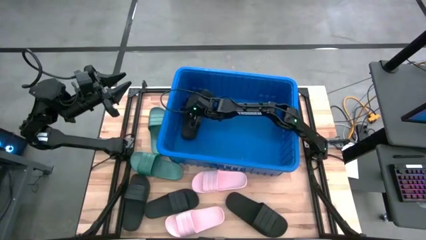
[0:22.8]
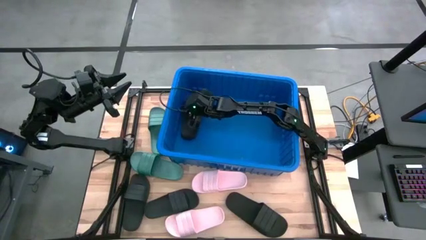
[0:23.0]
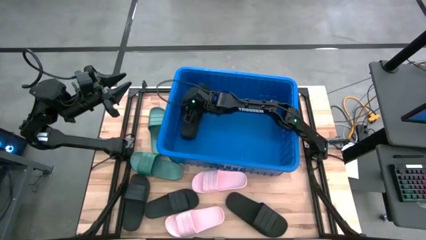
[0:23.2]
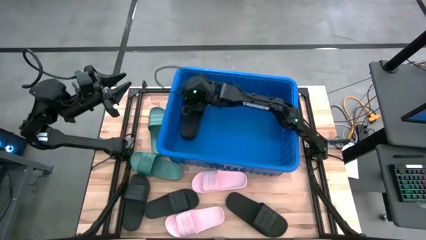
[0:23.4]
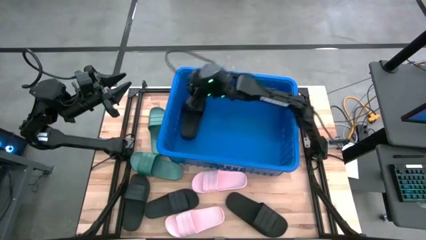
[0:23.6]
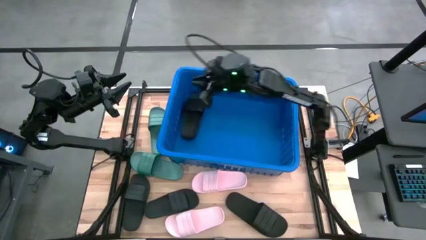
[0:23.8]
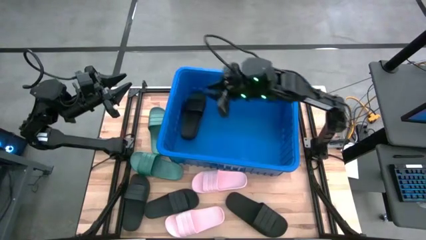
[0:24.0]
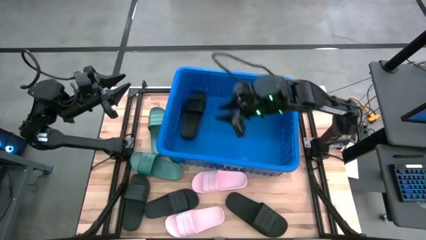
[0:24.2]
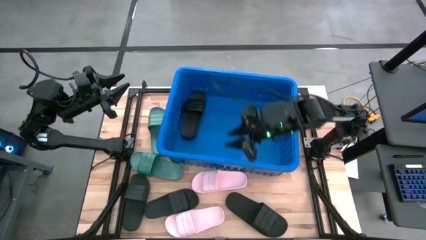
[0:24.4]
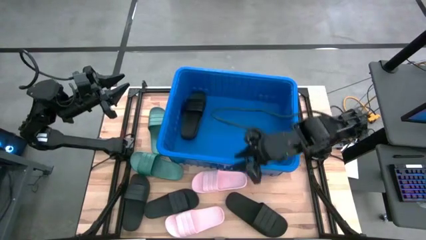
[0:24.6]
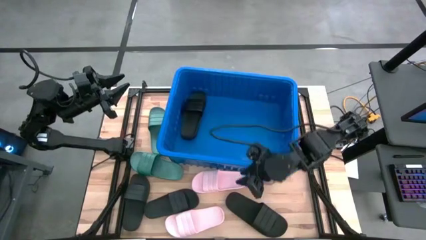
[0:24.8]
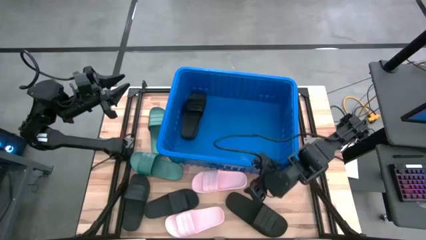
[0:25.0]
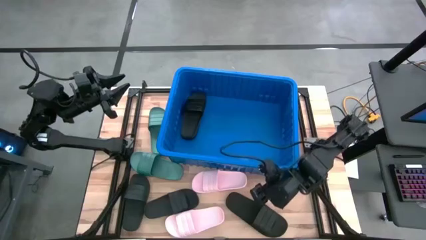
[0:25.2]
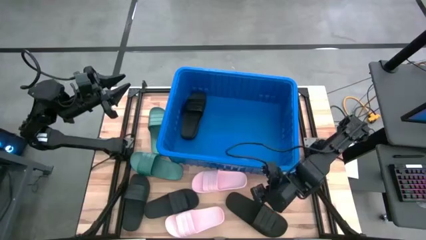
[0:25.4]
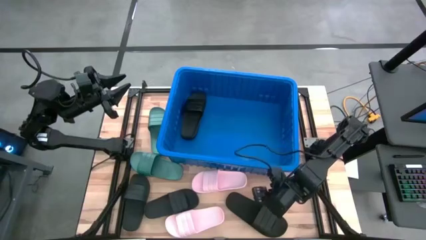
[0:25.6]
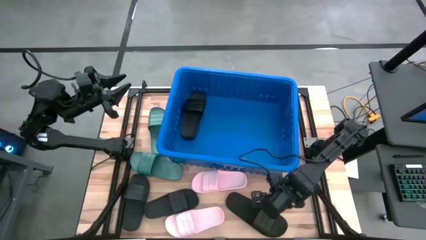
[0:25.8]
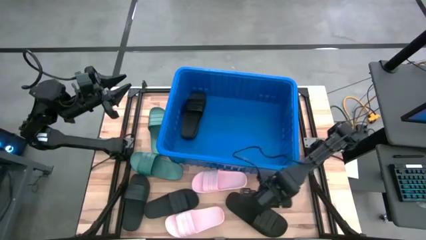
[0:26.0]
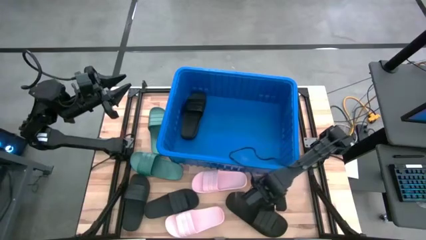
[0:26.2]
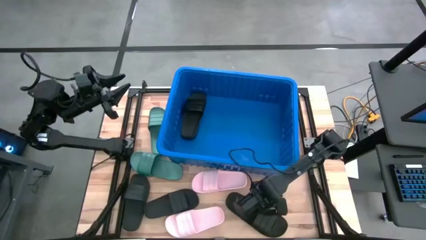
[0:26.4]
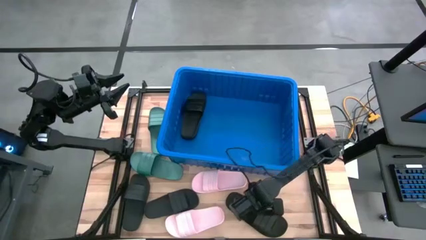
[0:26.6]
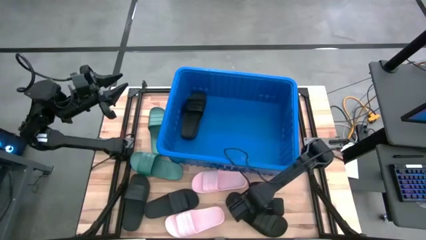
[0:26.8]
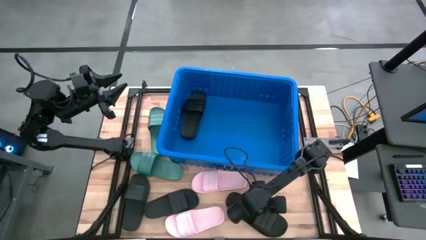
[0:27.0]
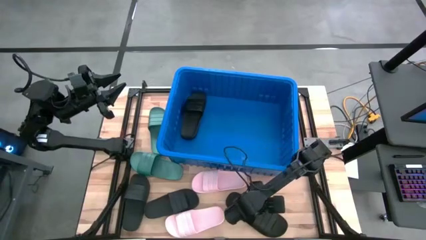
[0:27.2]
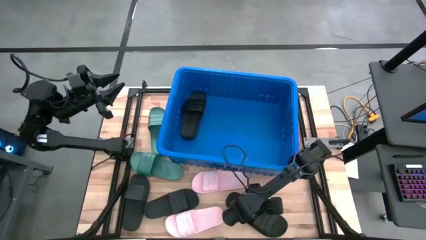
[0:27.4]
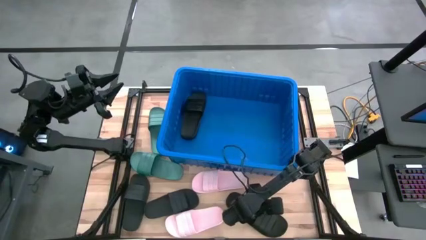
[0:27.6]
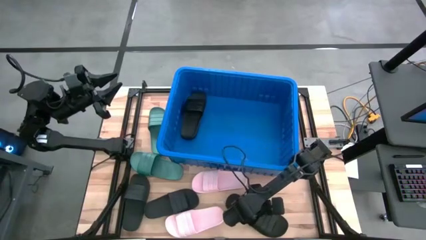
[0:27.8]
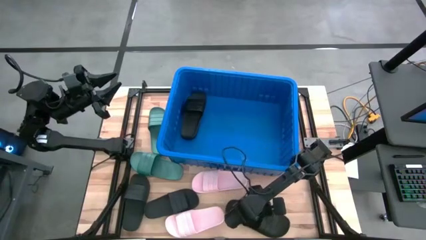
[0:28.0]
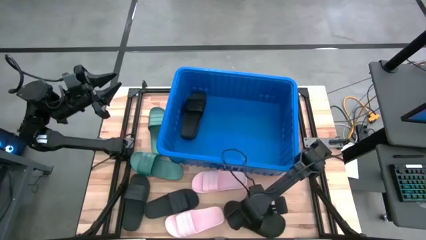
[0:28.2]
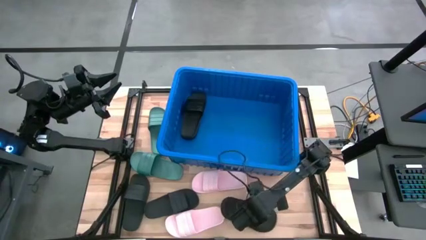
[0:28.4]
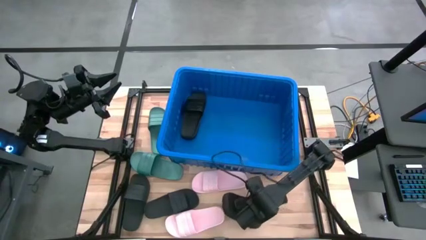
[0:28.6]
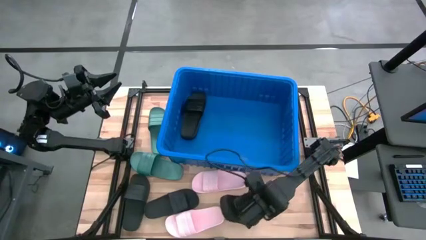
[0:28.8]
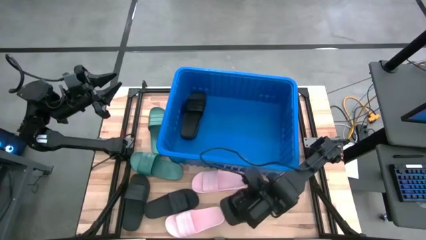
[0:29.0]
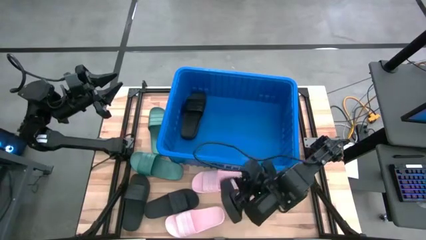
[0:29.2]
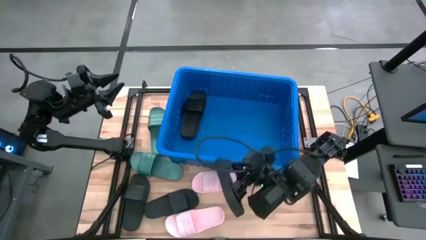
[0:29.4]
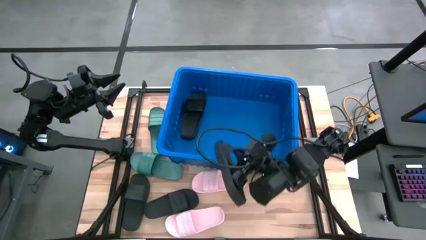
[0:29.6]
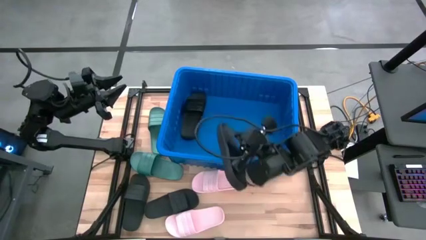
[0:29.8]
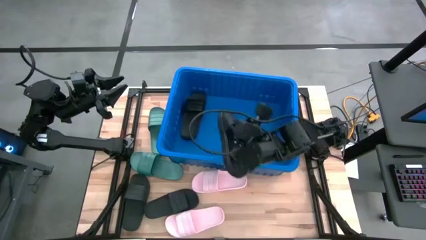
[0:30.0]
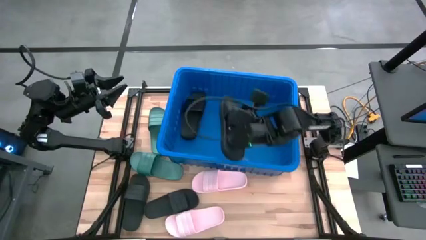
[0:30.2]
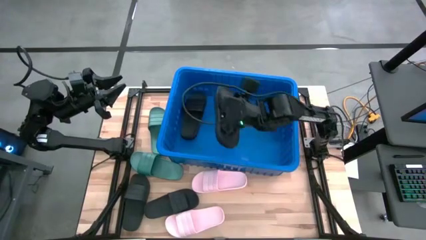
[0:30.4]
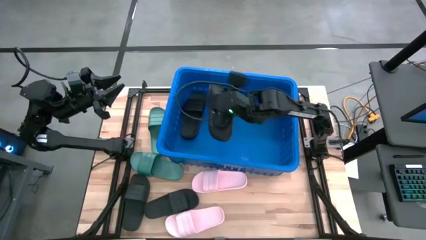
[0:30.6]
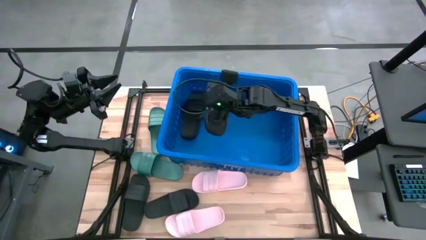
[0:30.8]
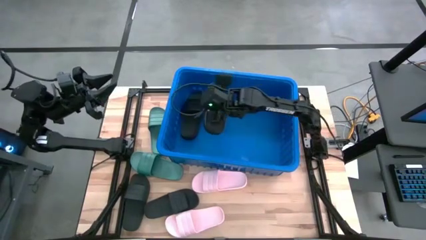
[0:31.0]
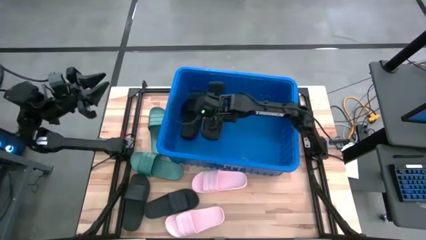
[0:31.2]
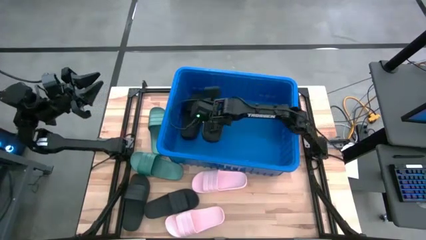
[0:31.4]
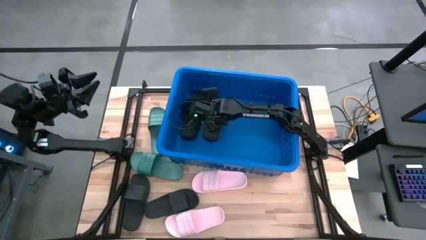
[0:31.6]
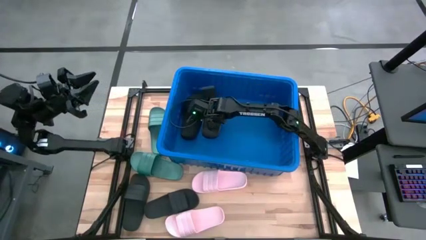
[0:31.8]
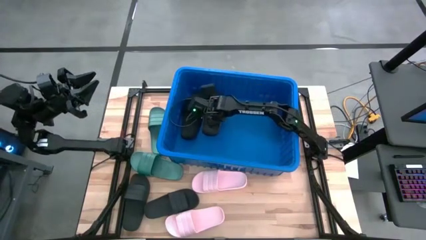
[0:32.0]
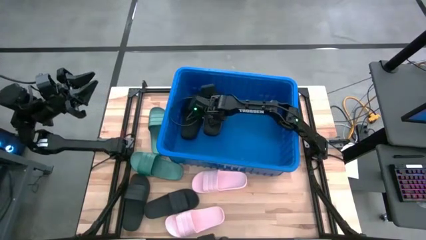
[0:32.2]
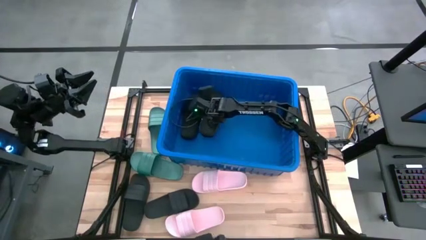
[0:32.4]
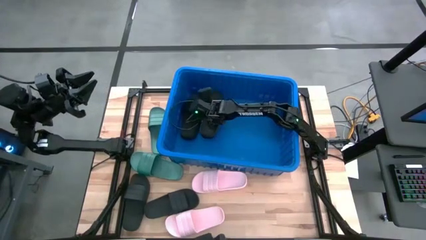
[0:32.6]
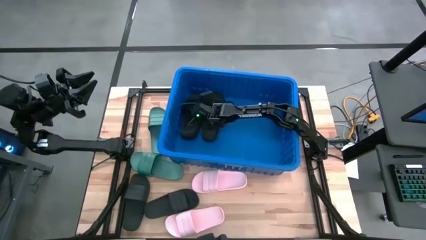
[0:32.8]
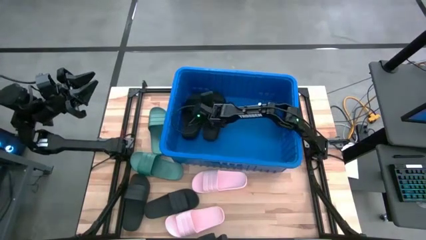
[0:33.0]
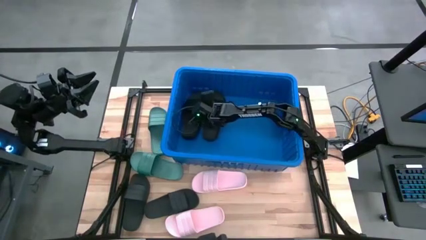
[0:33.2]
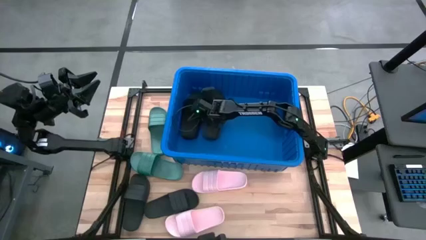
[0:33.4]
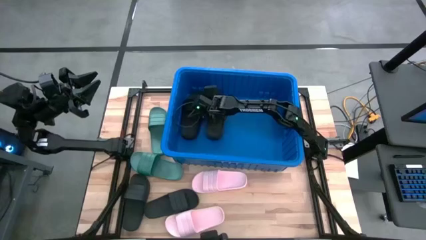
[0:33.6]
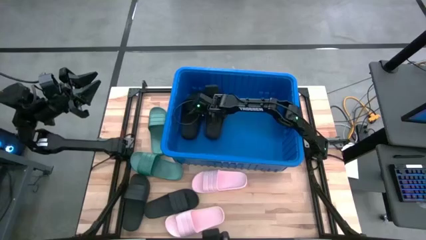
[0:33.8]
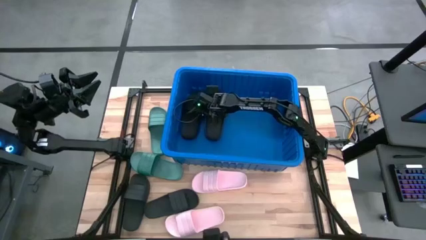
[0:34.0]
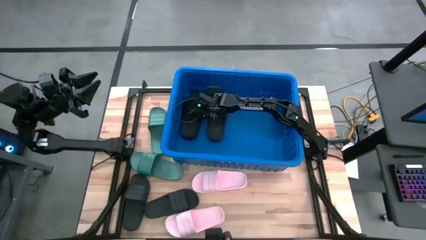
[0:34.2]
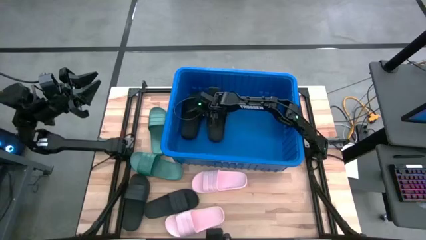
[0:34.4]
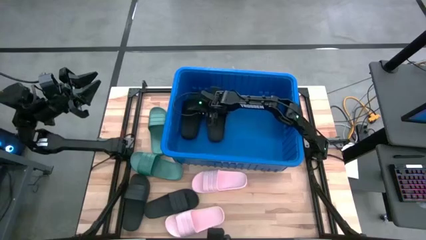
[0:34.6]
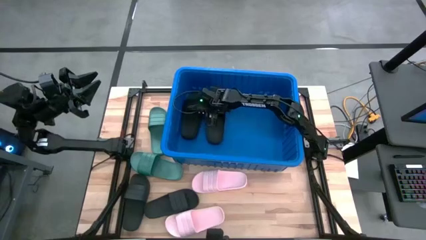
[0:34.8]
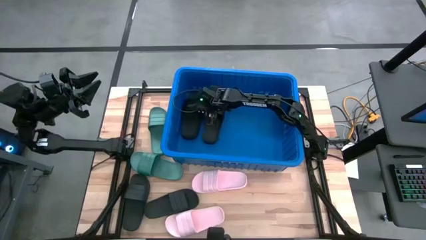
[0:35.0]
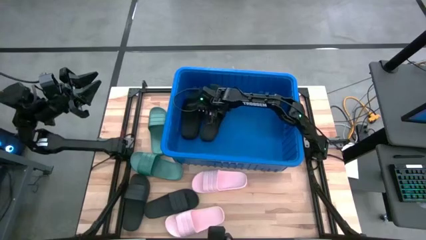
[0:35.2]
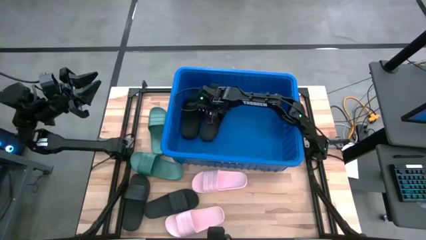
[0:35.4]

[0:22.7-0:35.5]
Task: Pick and place slides into bin
Put the right black slide into the blue bin
